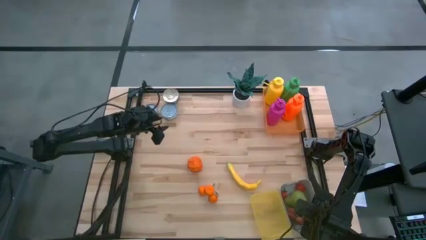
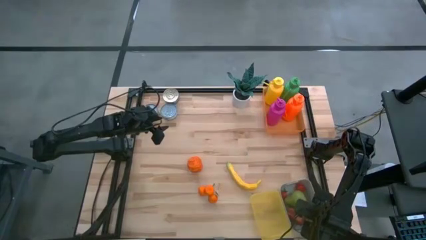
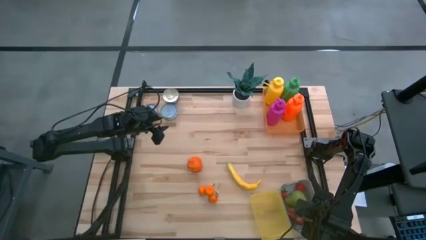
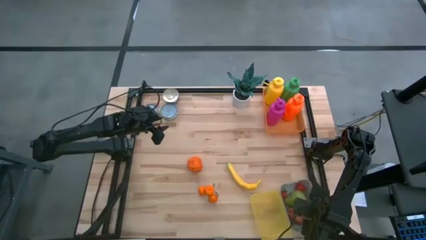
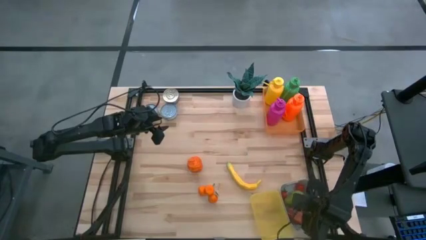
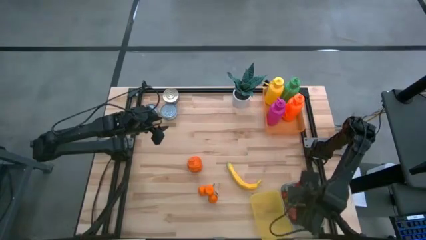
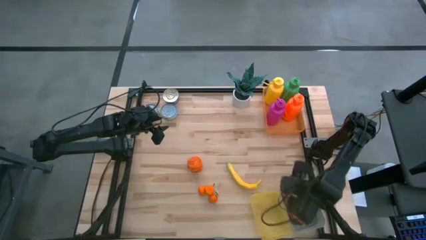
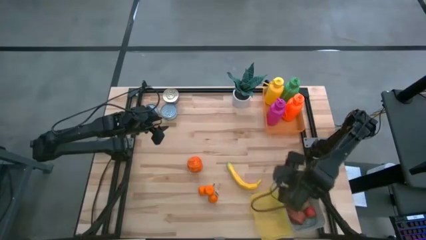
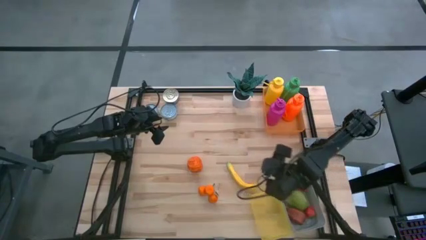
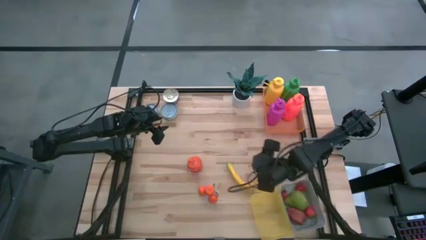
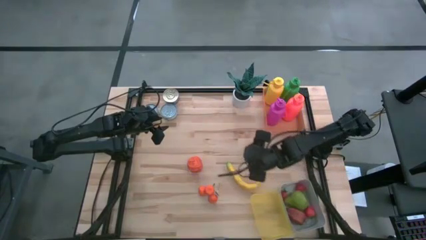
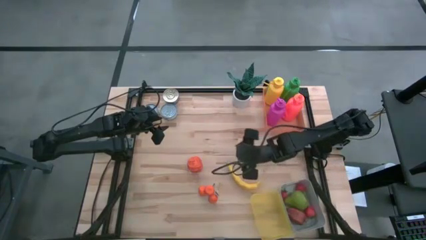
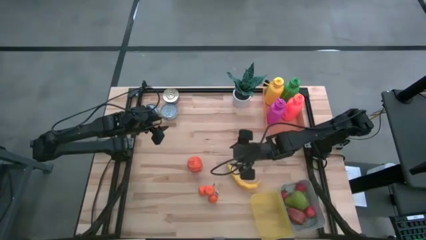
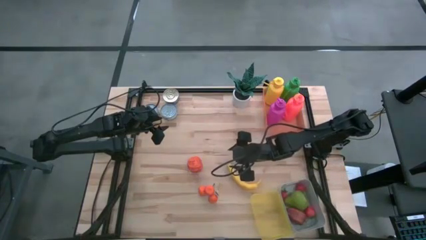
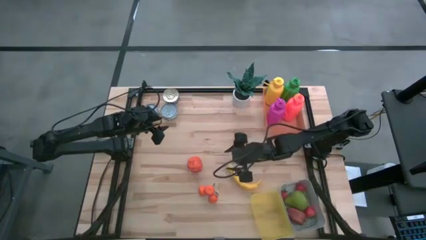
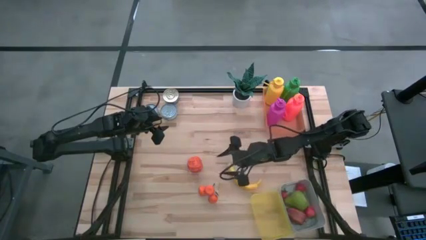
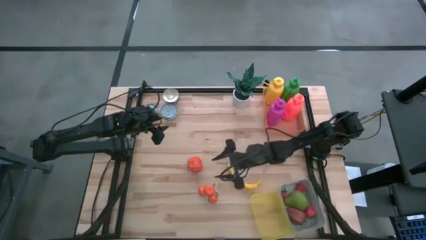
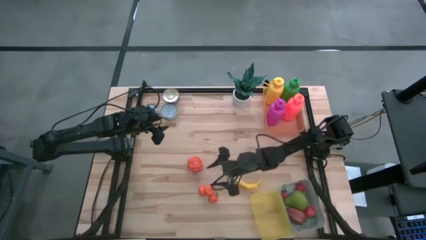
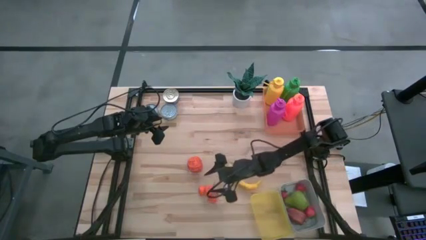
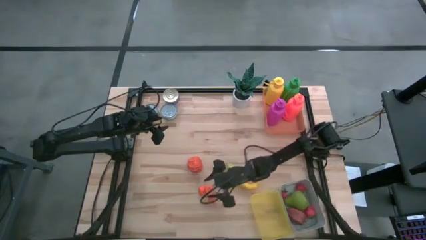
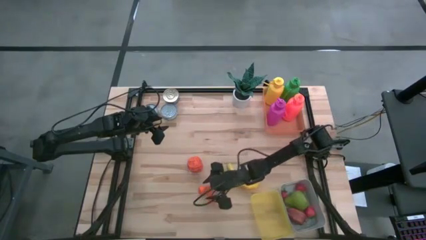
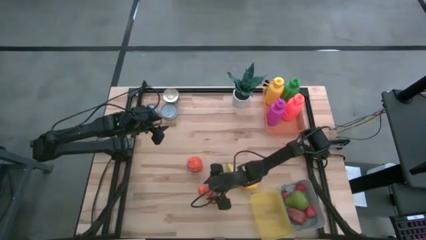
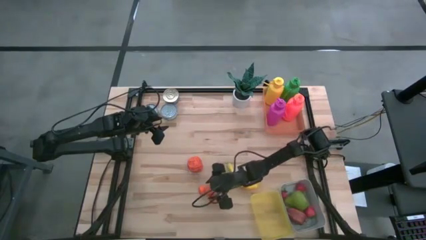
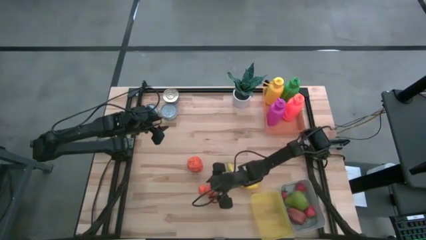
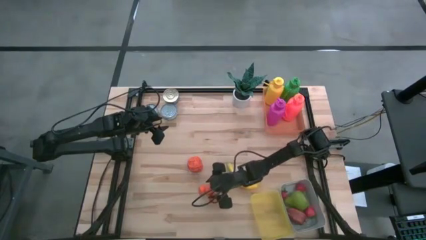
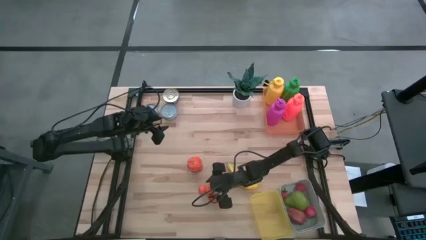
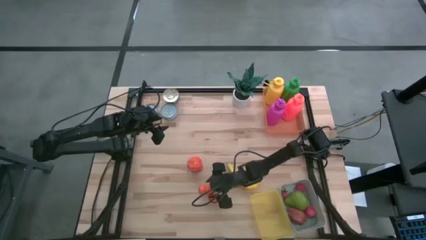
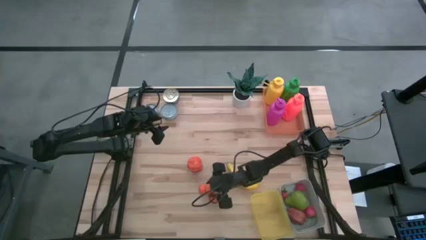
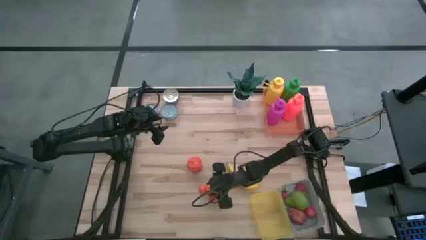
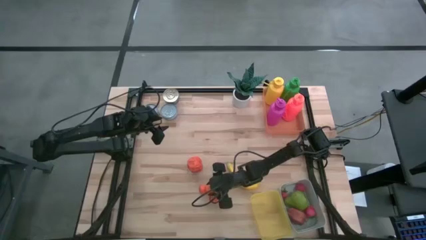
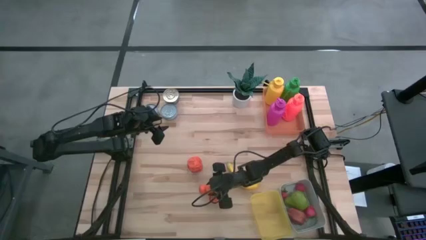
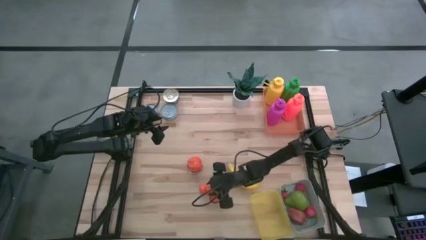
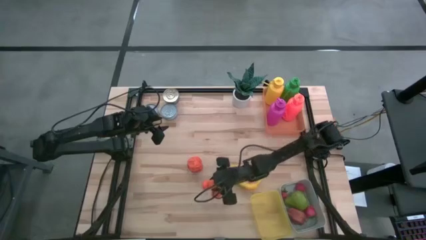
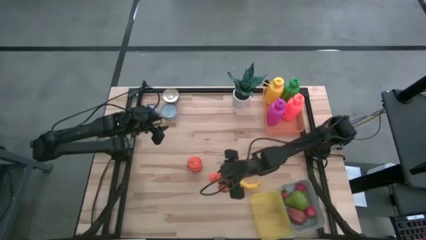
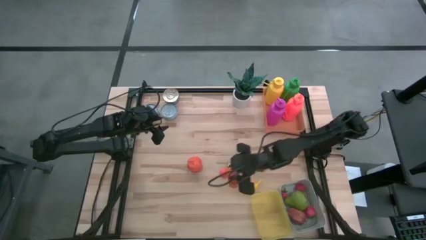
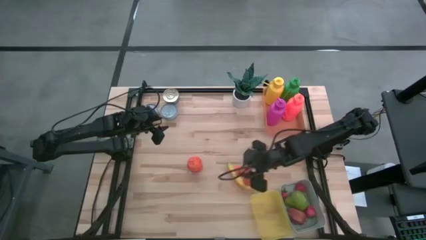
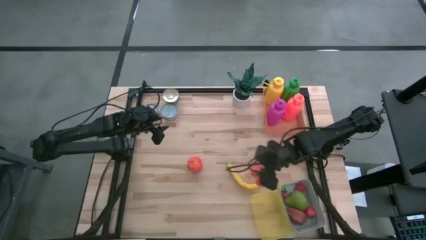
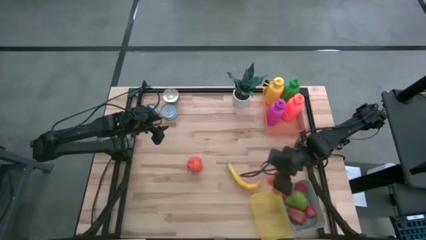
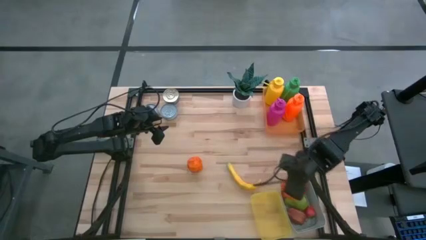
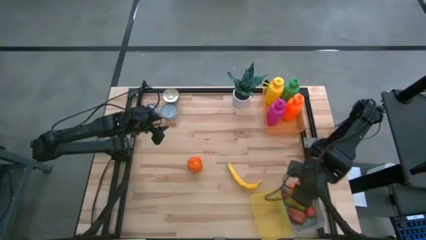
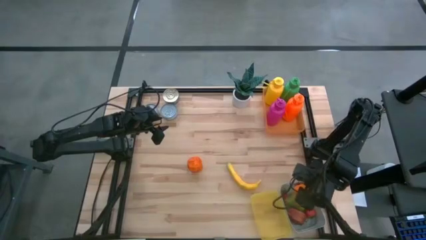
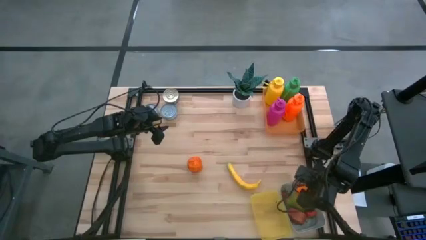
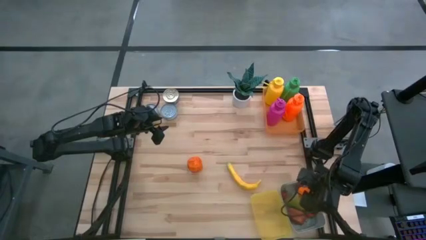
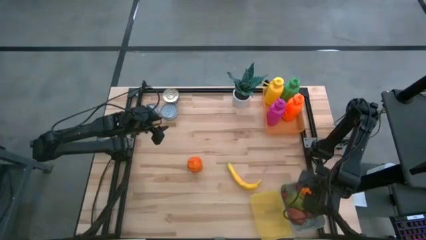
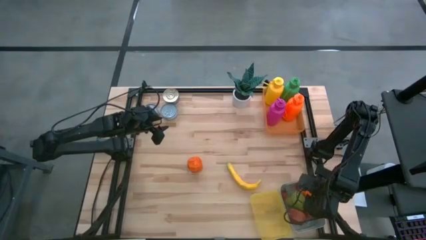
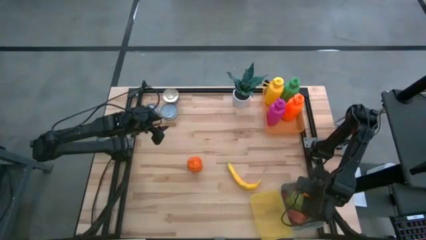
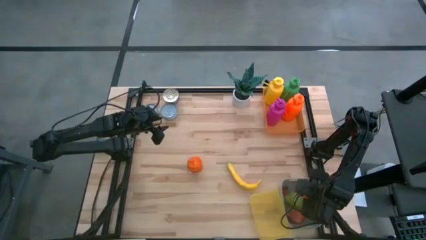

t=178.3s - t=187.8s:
Task: Pick & Place Food Item
Put the tangerine into the gray bin

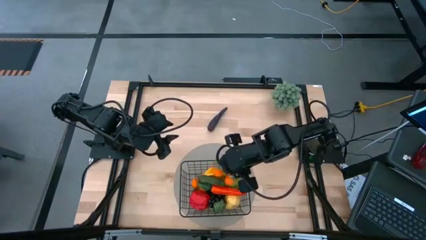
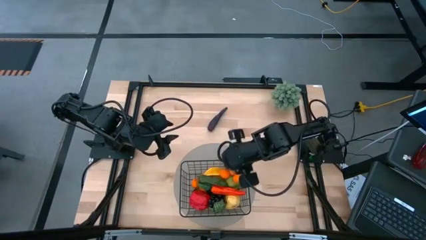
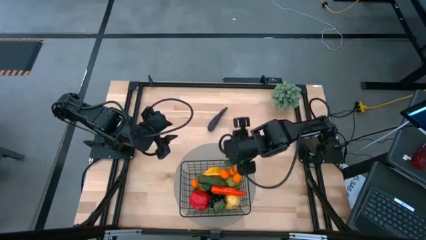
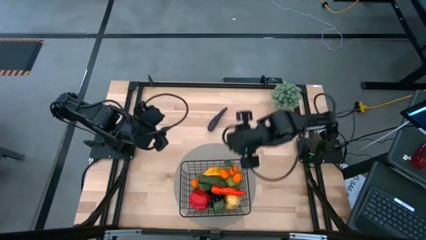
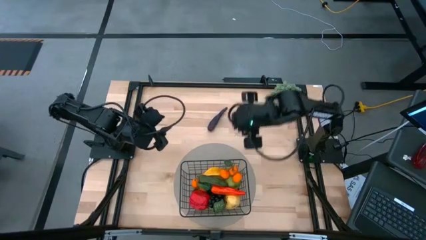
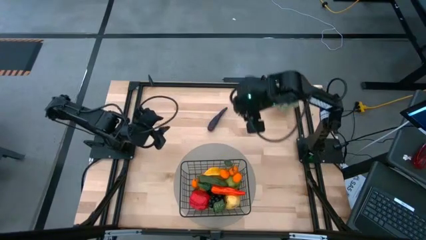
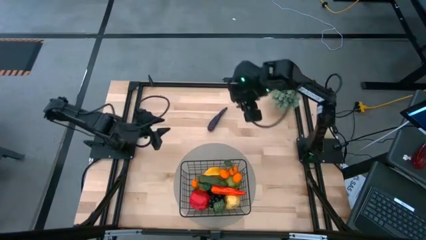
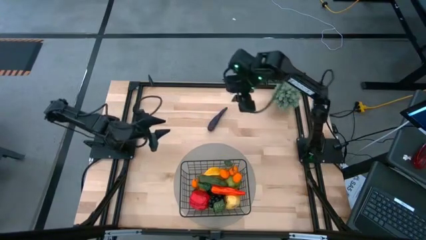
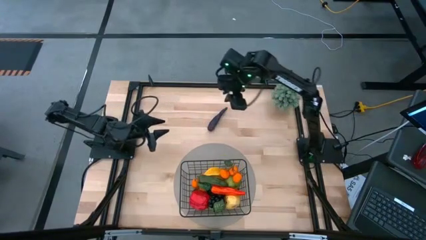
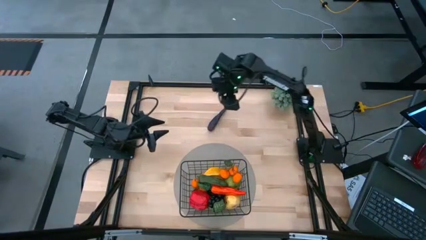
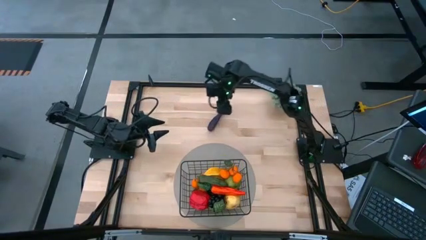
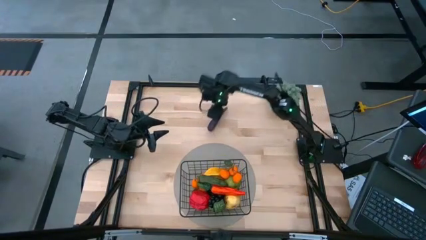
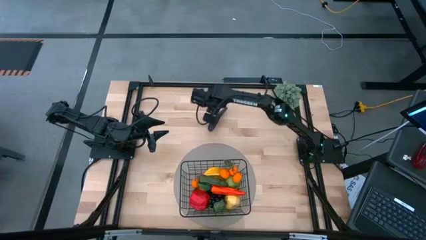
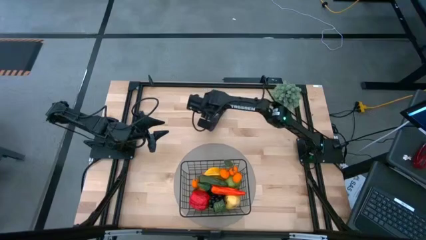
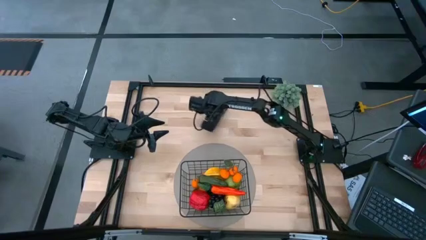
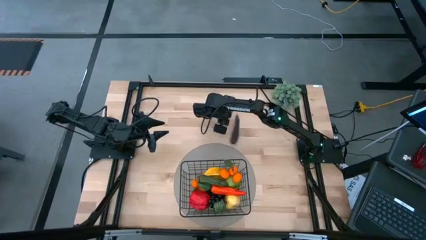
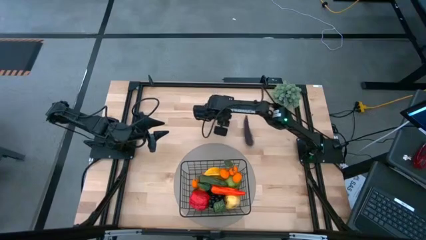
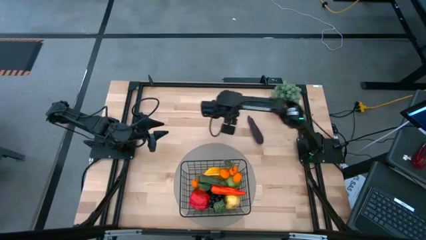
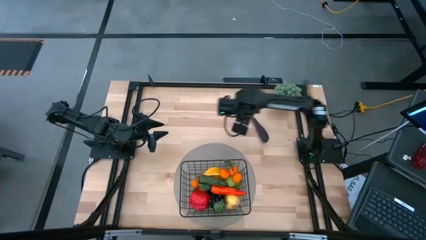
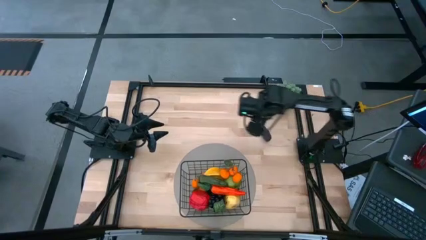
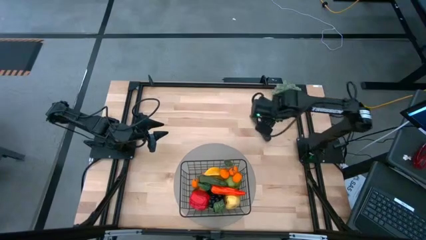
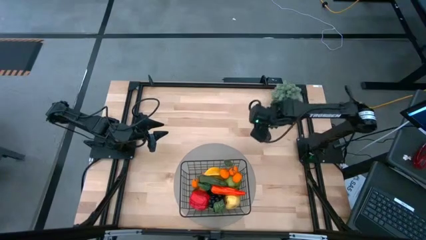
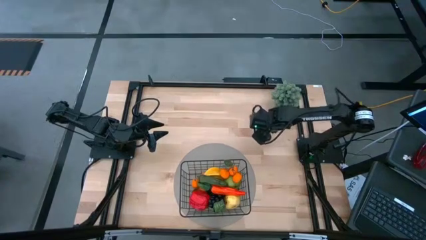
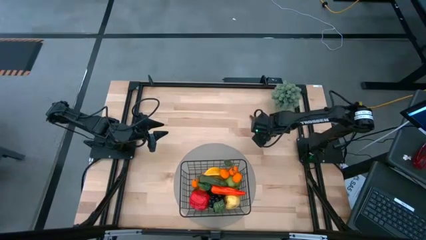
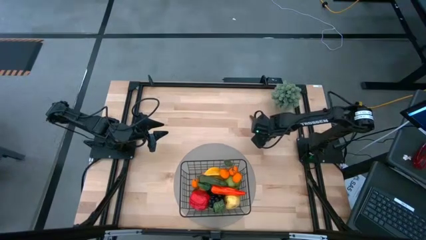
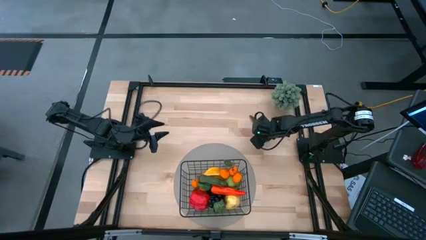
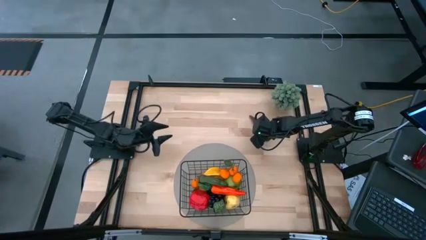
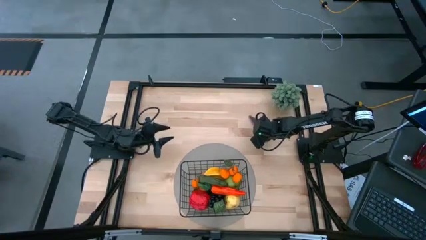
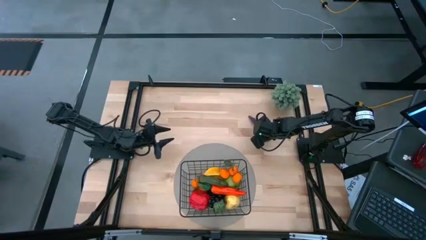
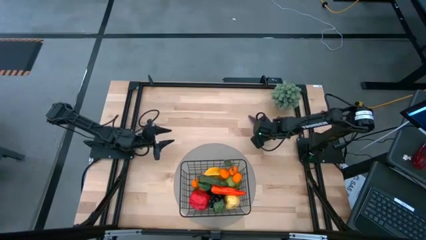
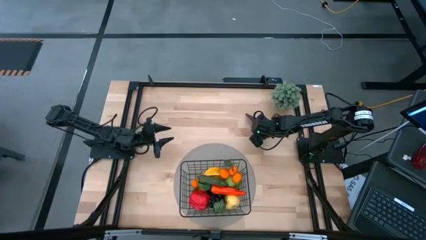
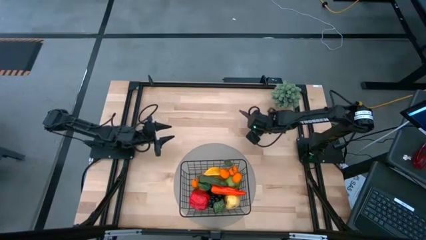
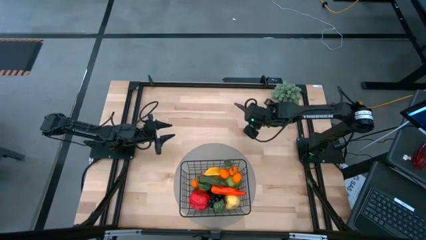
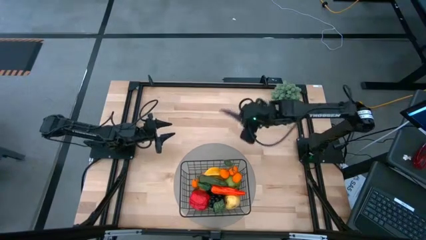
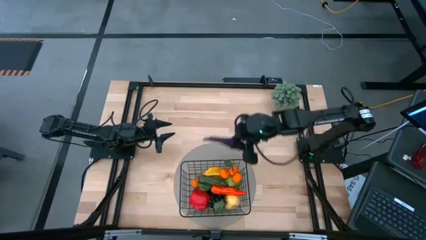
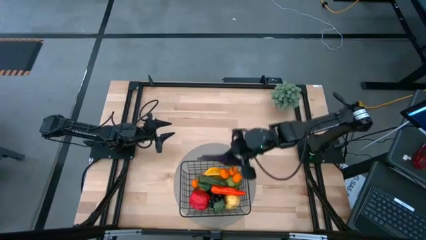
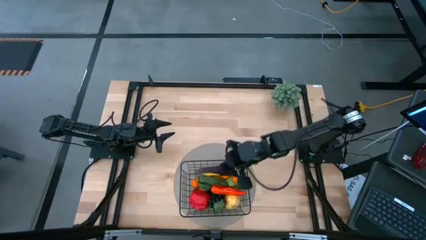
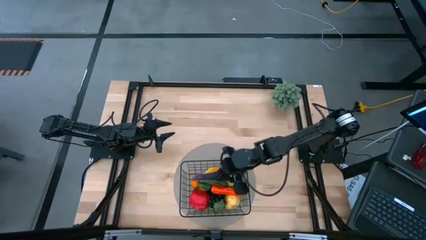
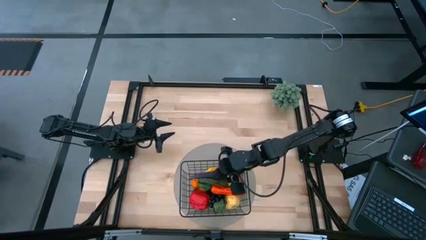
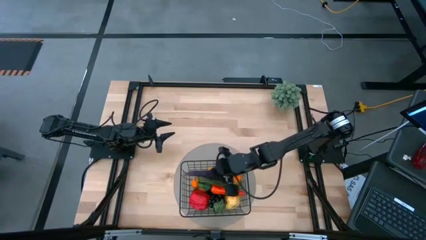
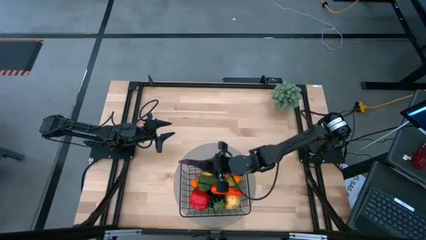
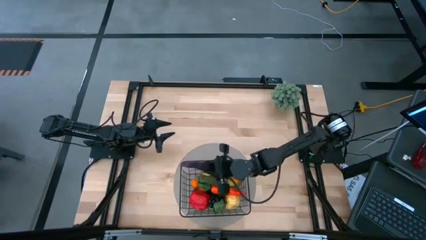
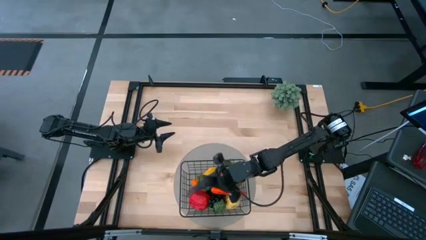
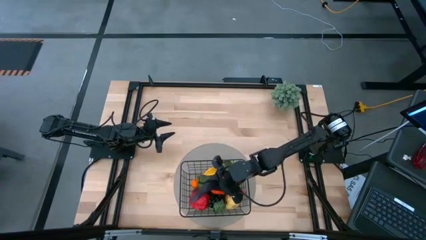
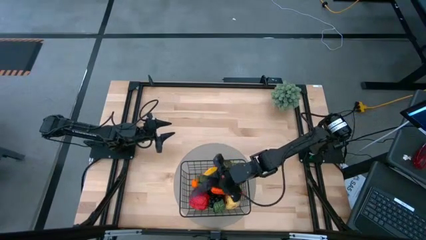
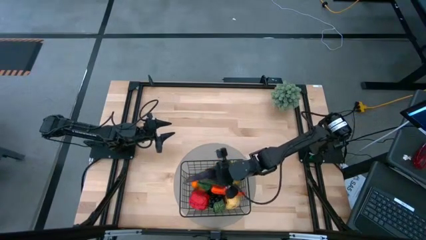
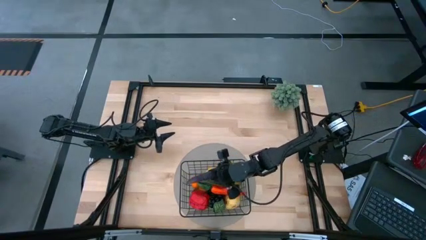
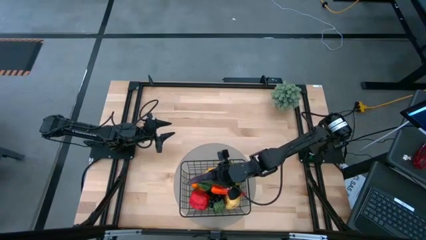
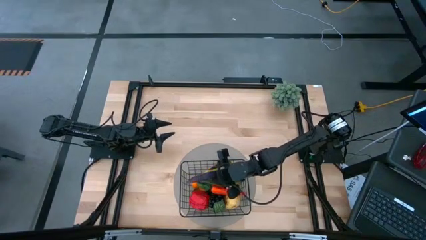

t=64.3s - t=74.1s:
Task: Build produce basket
Put the eggplant into the black wire basket
